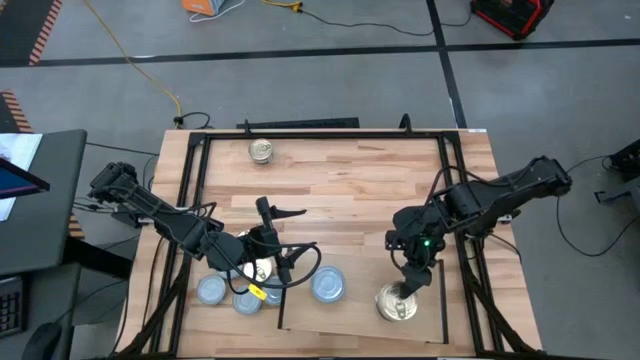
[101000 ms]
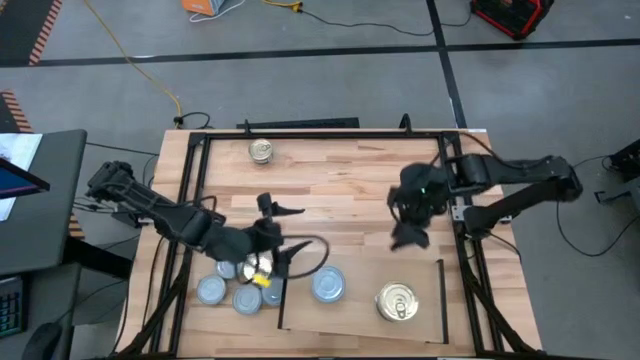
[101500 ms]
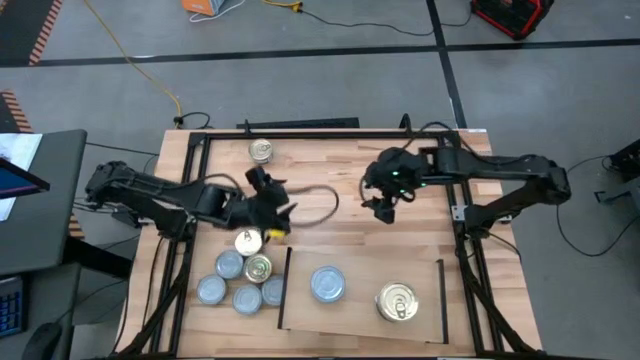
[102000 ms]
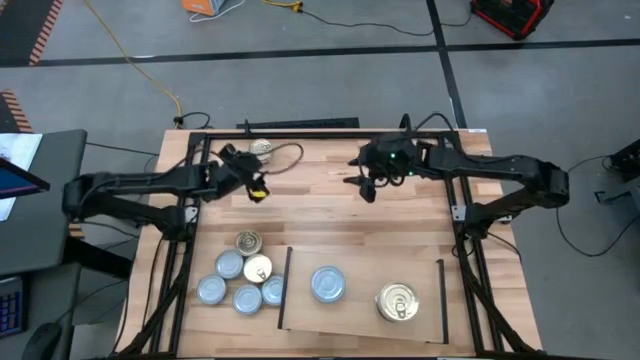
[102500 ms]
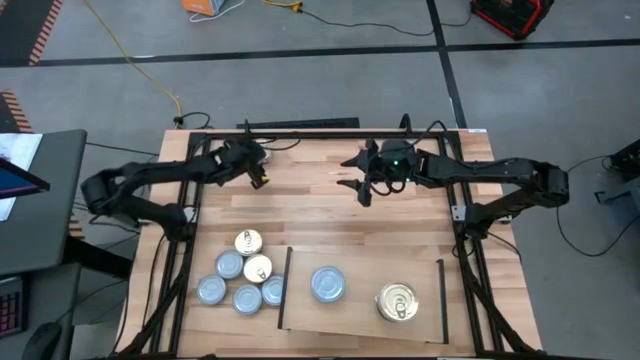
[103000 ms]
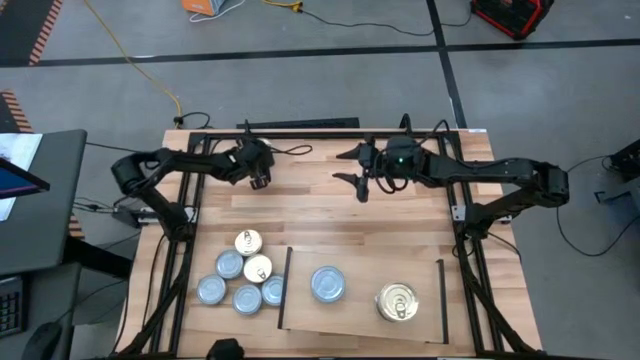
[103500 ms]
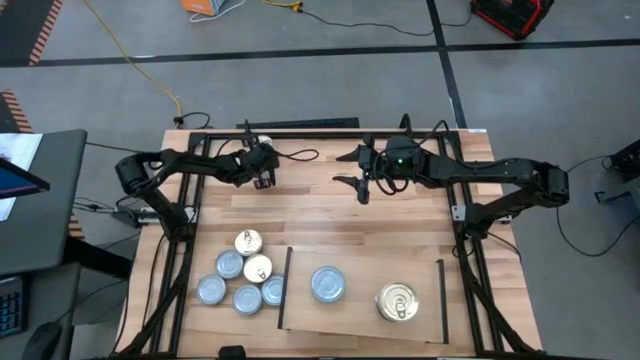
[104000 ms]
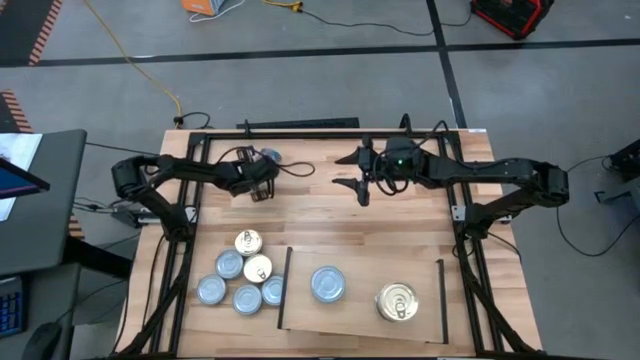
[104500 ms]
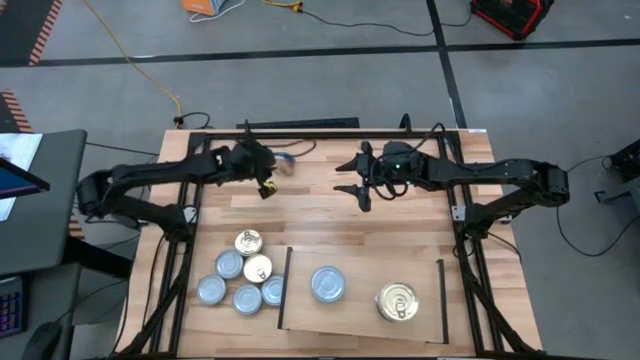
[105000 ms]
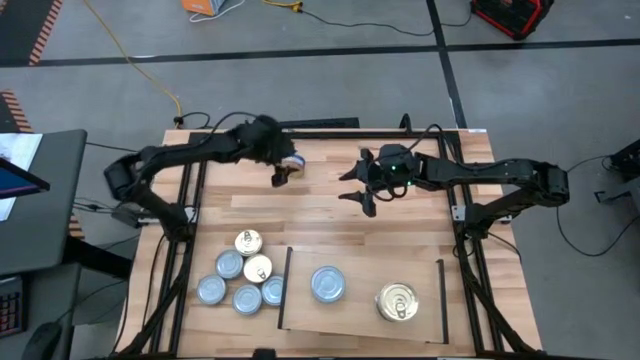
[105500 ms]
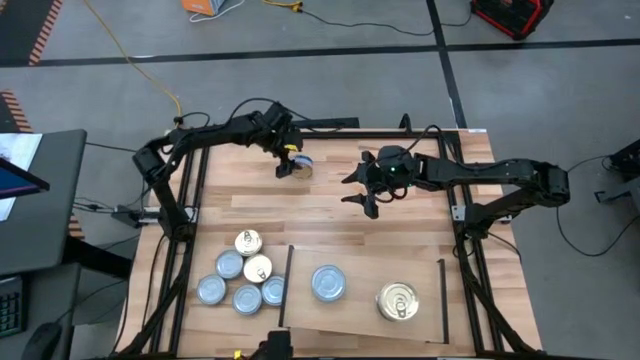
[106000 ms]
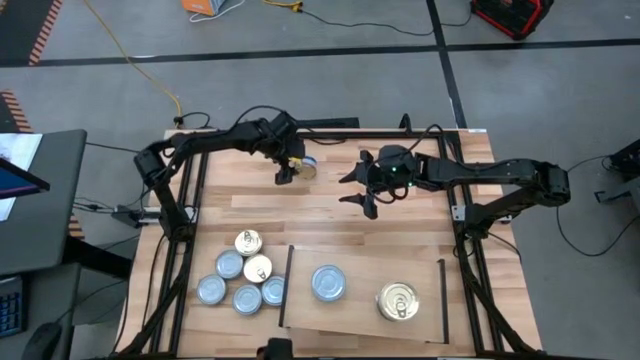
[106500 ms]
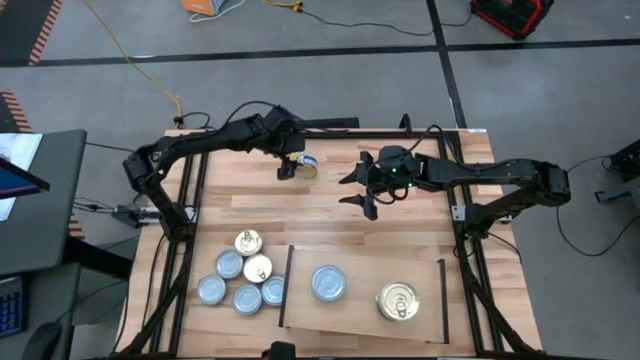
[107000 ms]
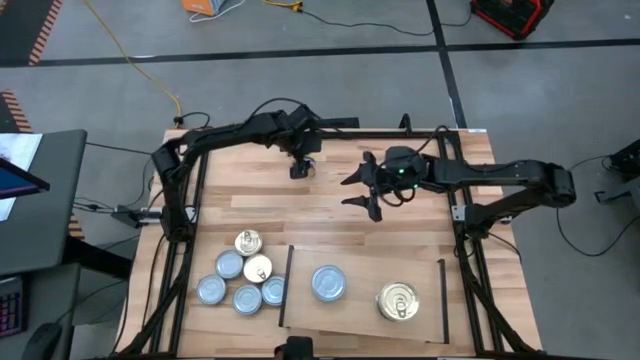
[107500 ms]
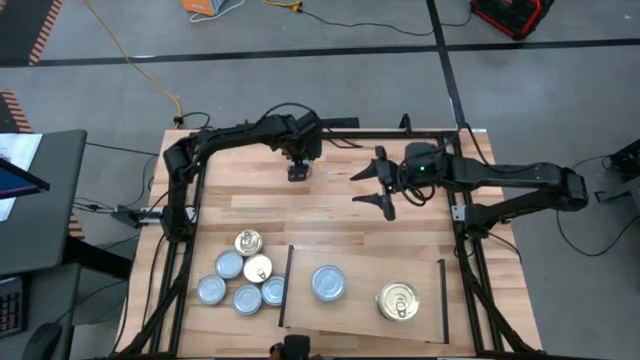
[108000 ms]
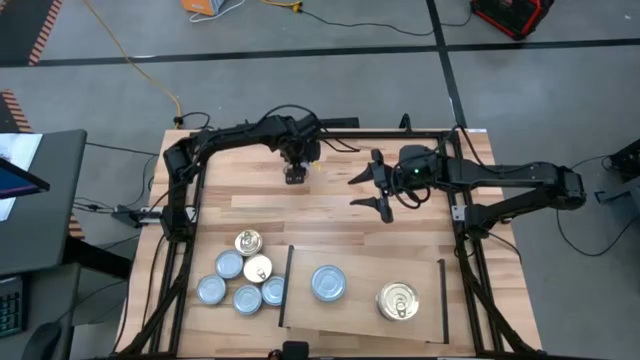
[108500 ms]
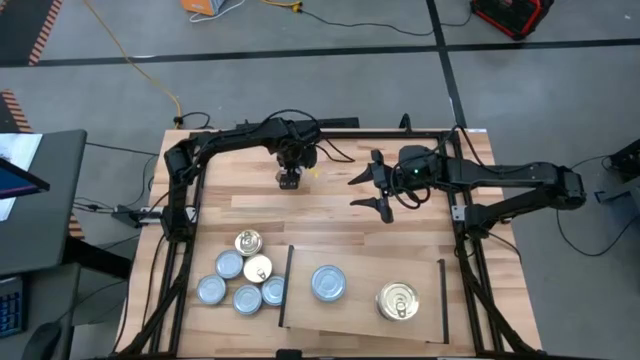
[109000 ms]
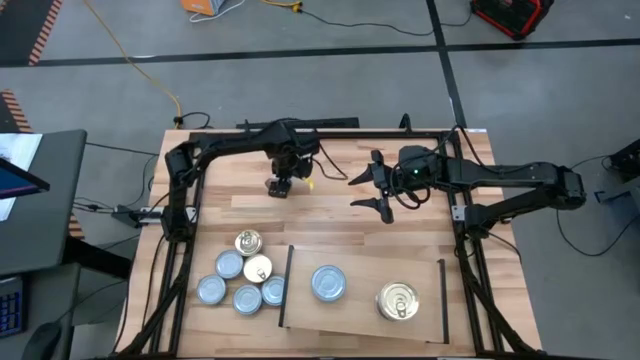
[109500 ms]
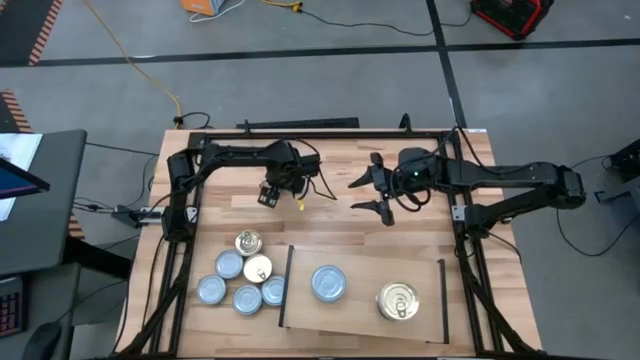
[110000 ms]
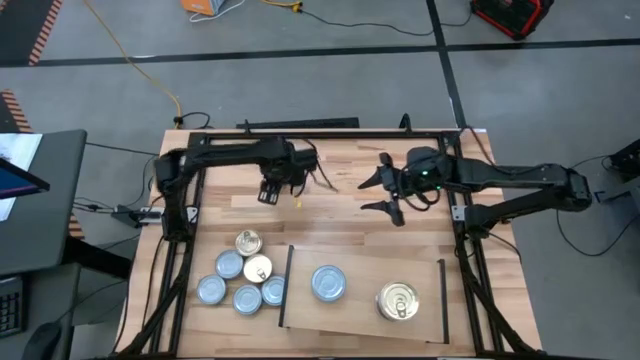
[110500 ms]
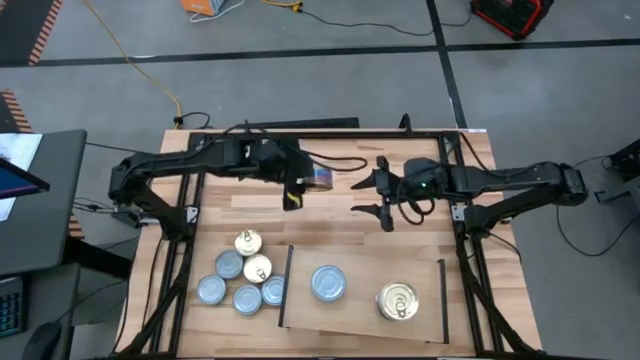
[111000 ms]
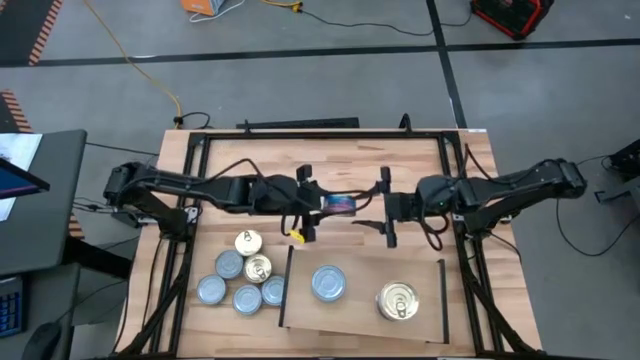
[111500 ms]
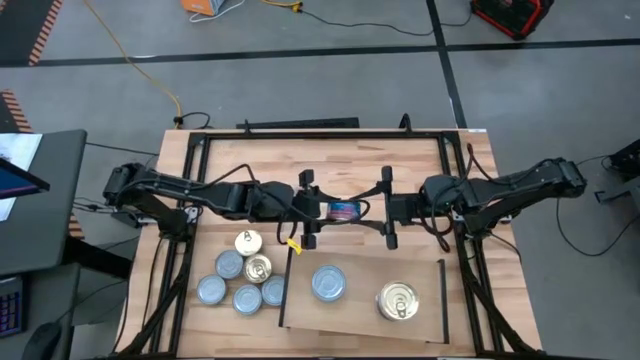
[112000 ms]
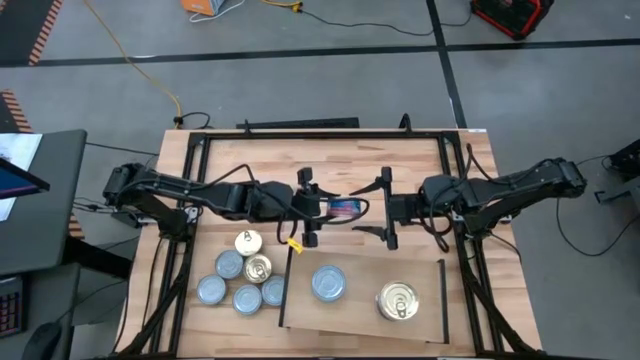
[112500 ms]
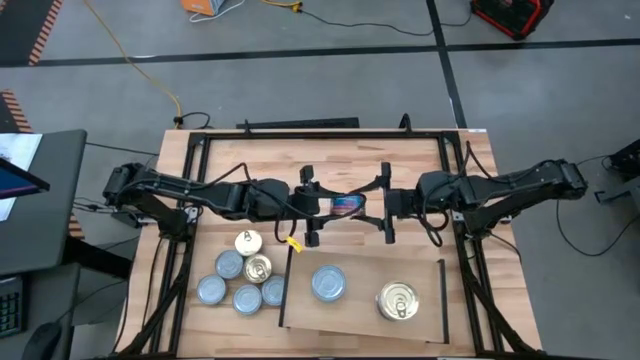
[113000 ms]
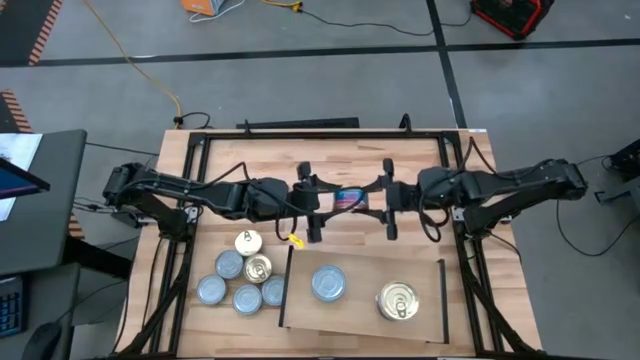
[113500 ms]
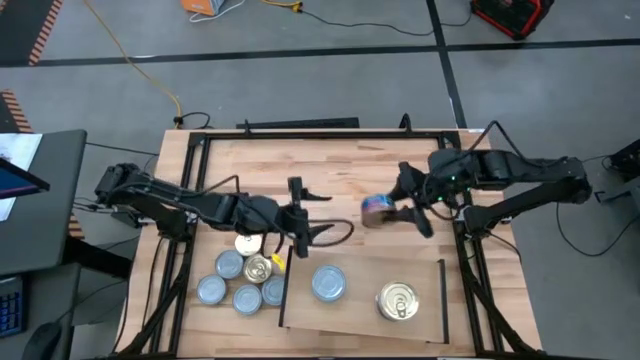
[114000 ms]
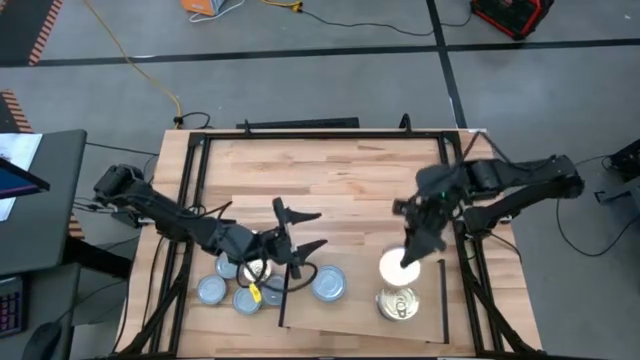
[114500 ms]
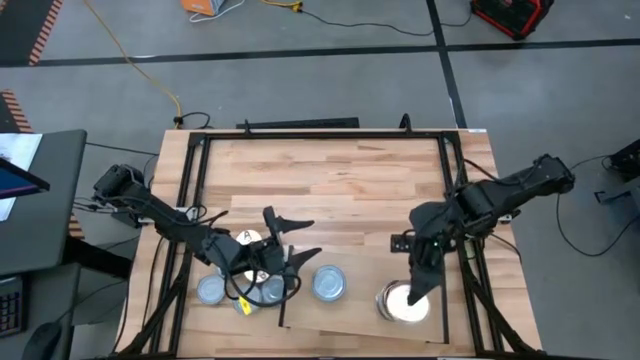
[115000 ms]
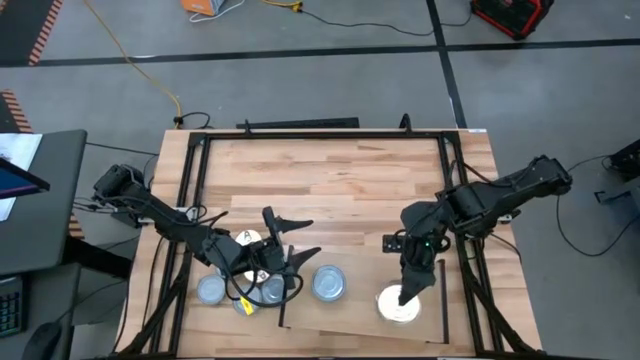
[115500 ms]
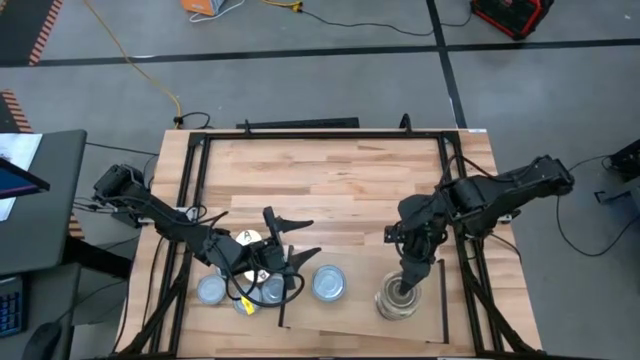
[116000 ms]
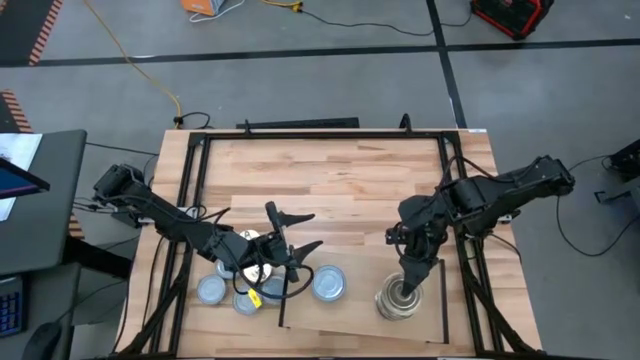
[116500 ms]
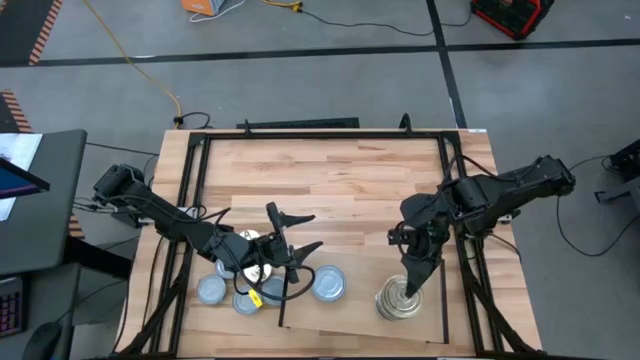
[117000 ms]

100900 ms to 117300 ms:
Task: Stack canned seafood by type on shelf
Stack the blue-pink tuna can on the top of the blue-pink tuna cans on the shelf

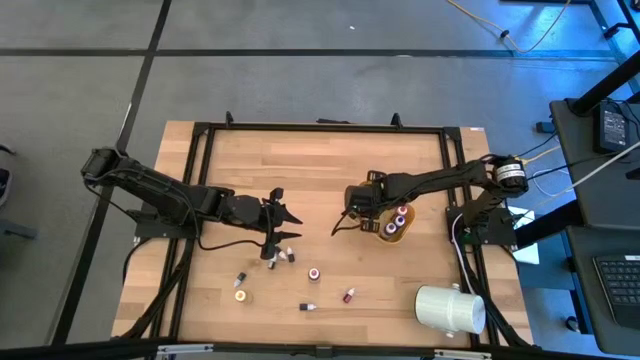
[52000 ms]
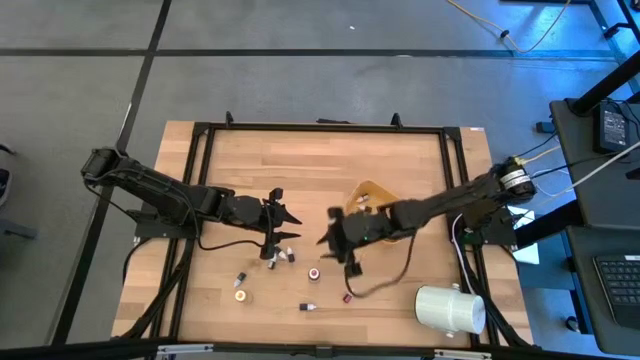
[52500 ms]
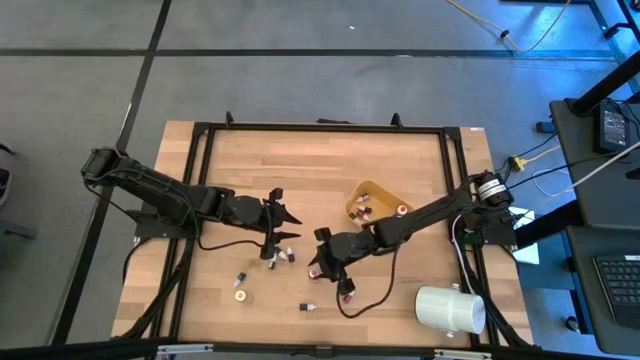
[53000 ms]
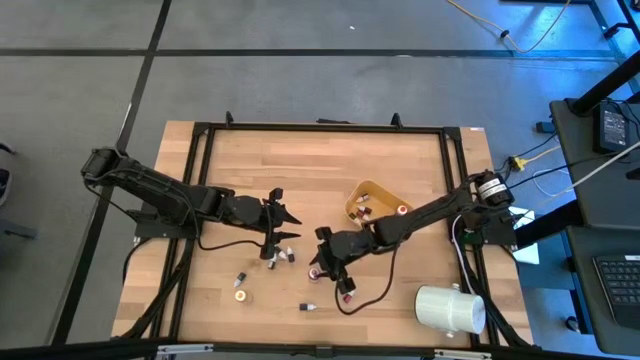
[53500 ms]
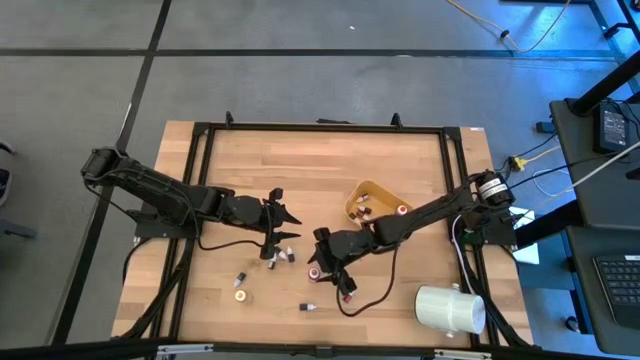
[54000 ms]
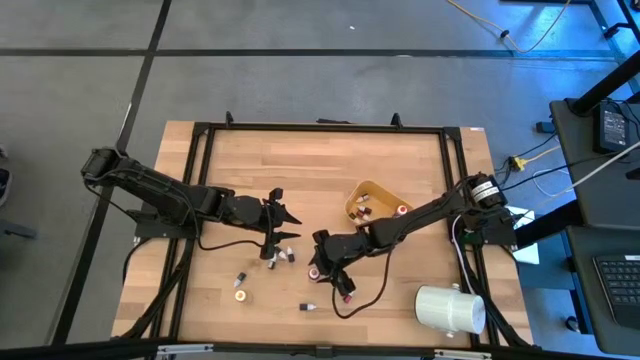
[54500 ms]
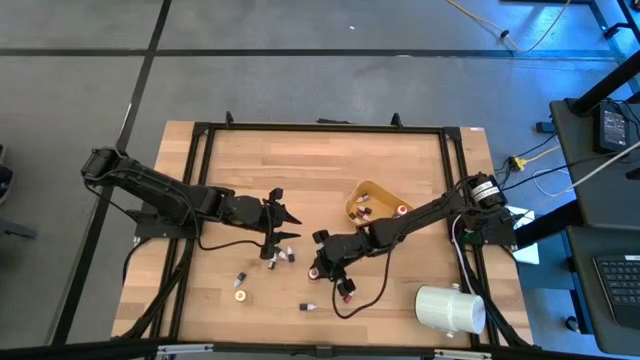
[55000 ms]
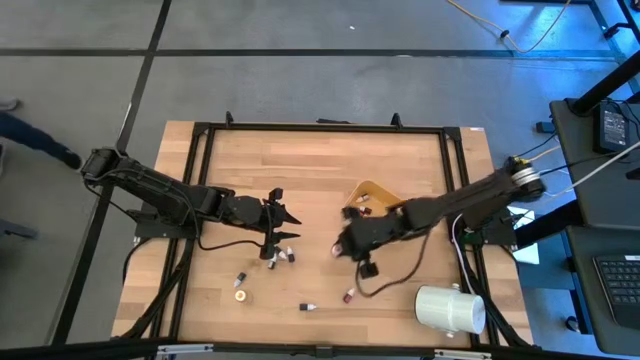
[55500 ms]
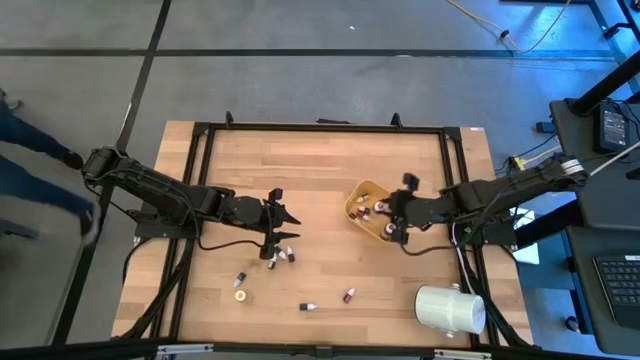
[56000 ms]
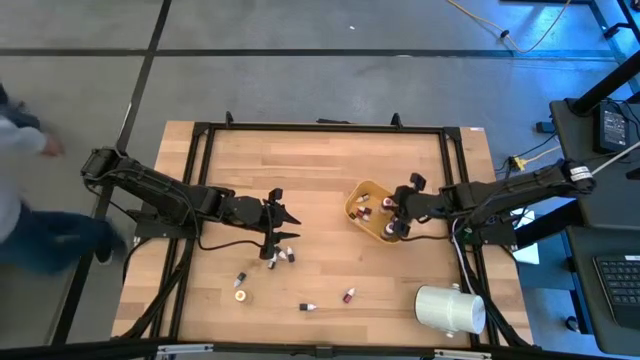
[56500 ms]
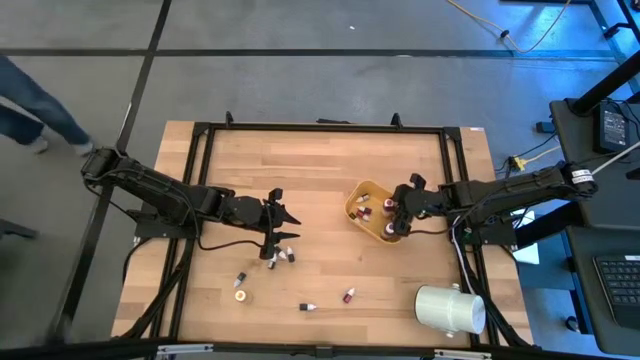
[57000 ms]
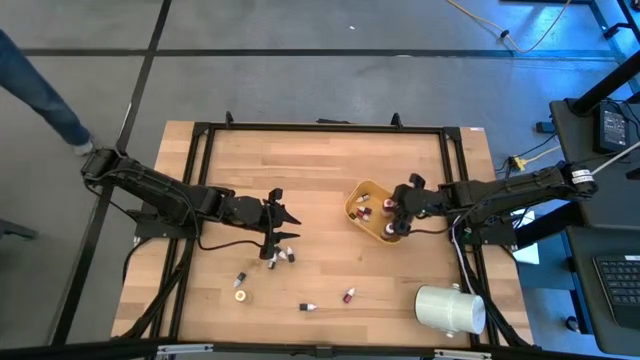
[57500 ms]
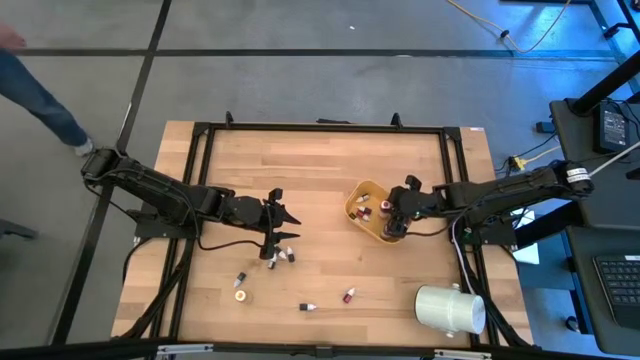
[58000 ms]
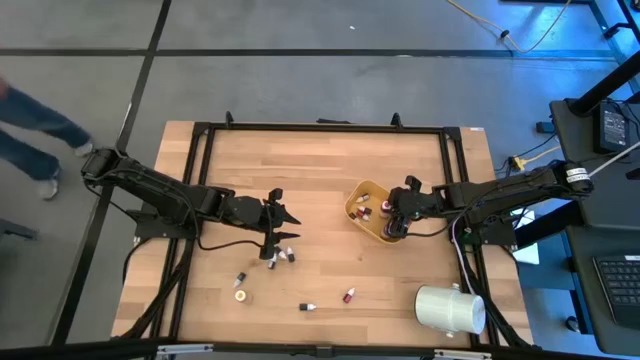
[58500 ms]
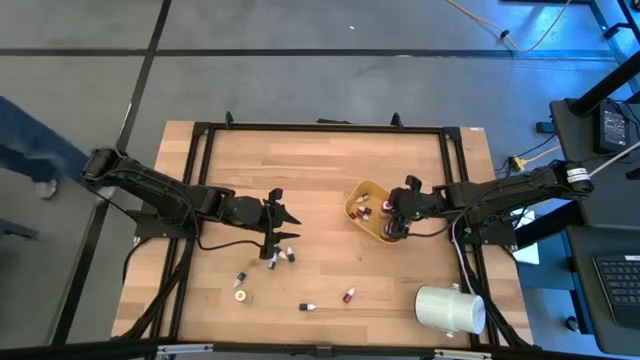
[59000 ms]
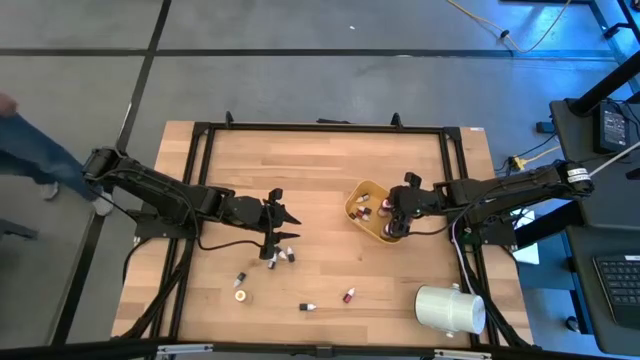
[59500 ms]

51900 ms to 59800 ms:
Task: Pick & Place food coloring
Put the large pink food coloring bottle in the yellow bin
